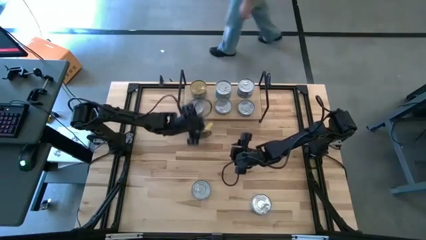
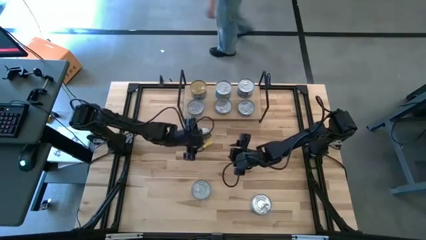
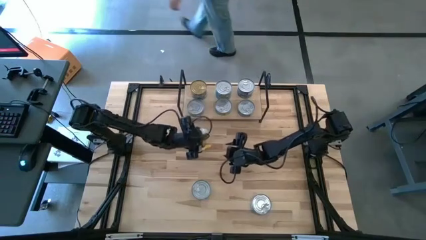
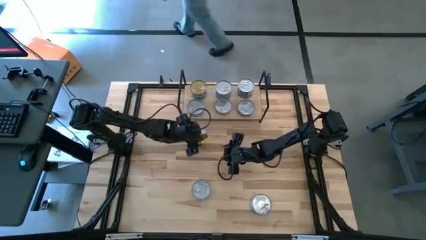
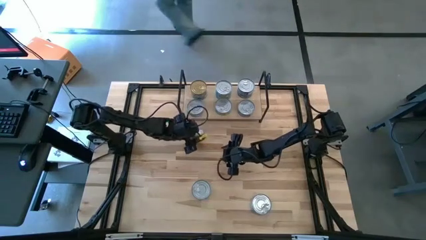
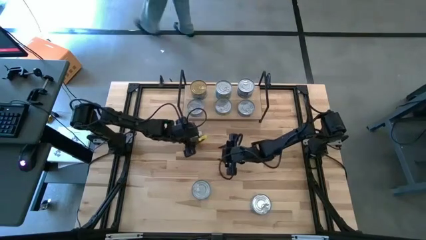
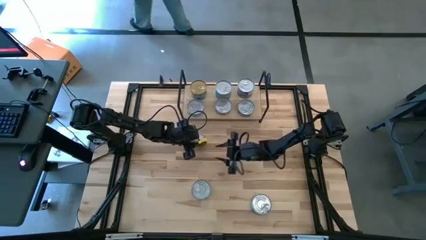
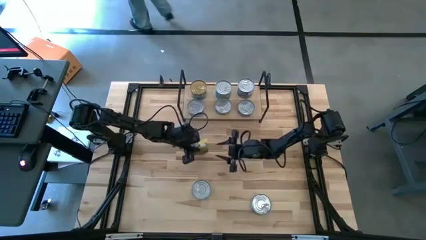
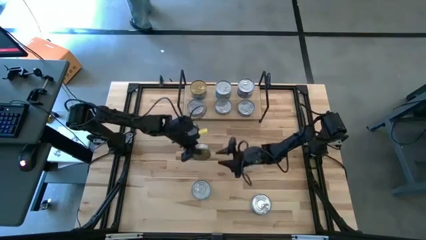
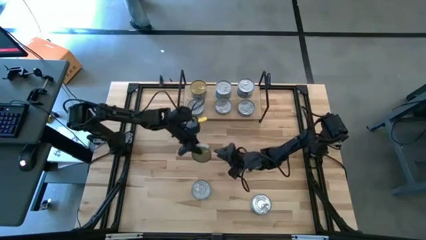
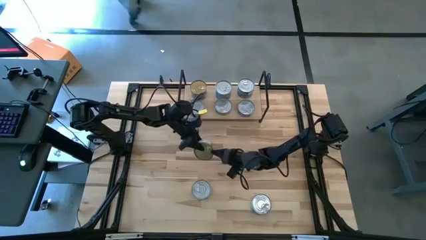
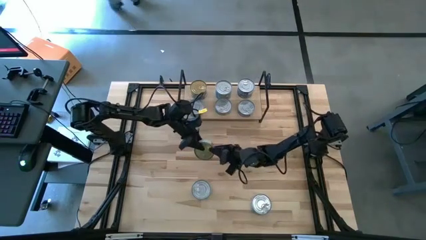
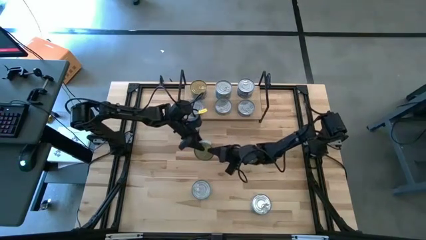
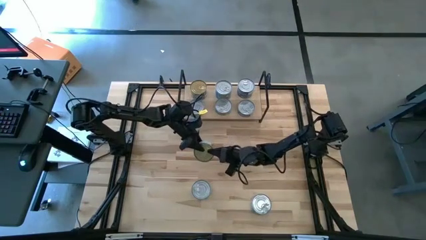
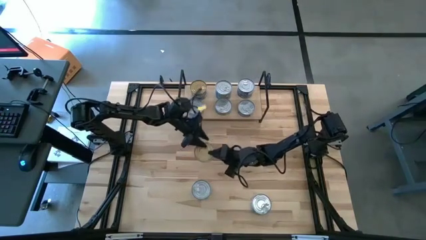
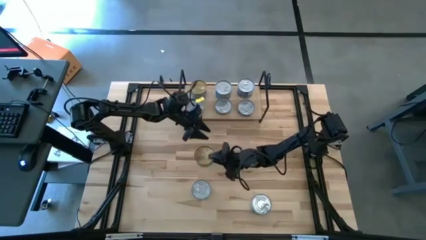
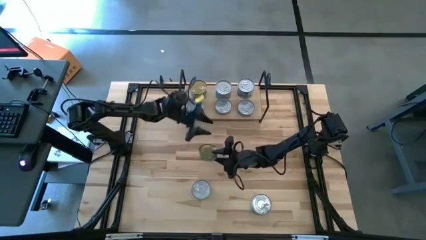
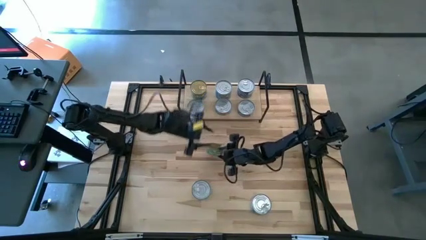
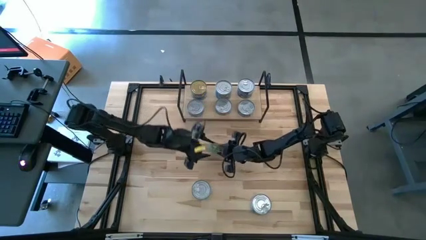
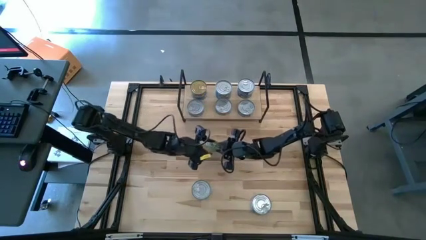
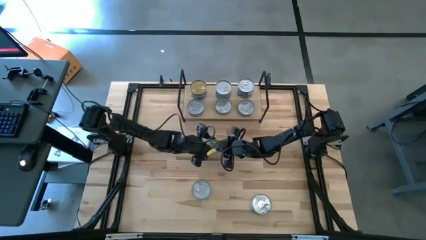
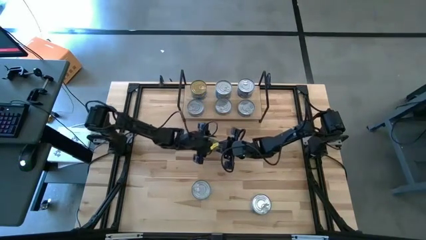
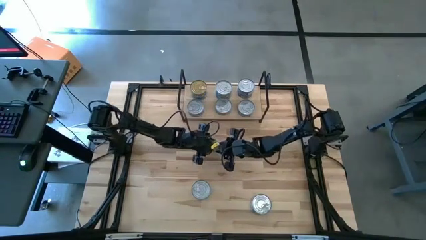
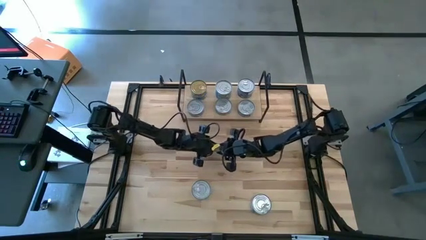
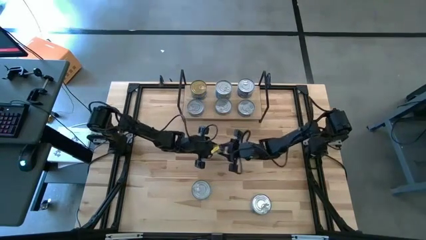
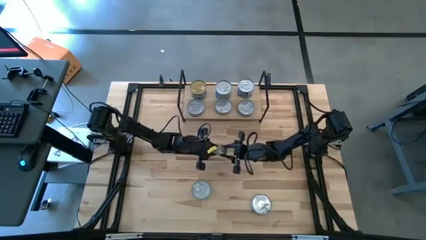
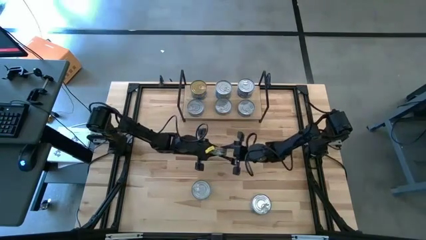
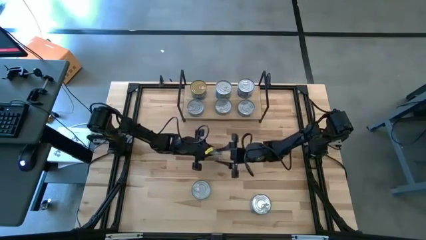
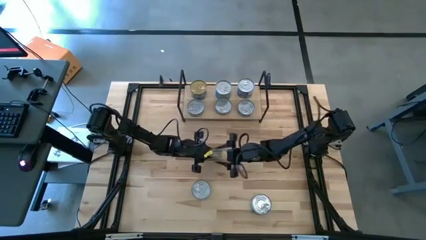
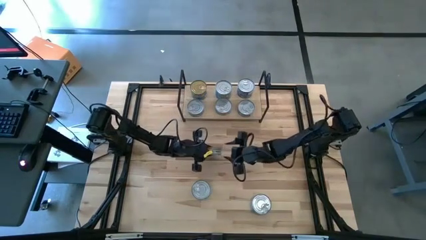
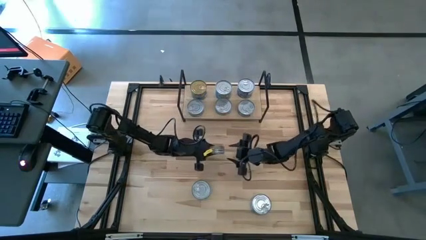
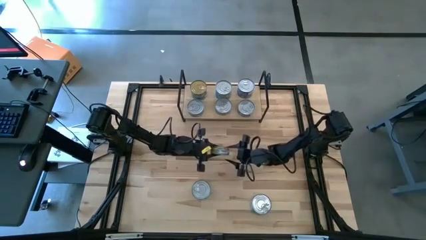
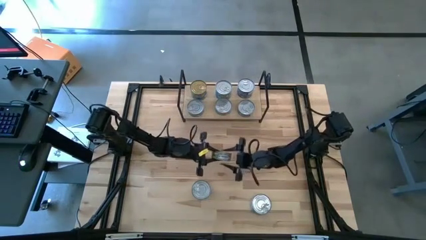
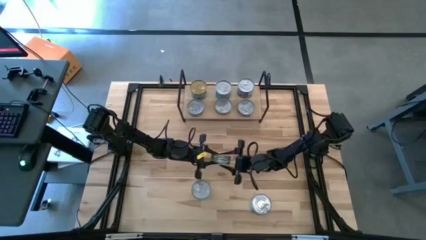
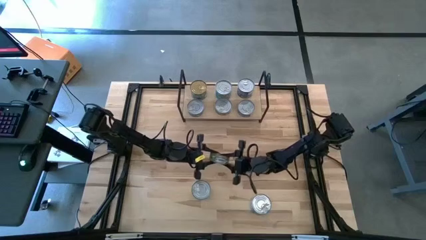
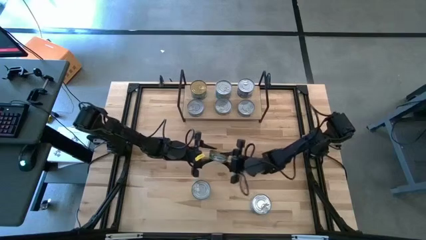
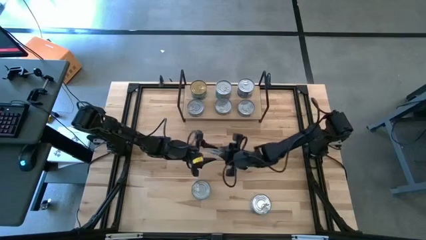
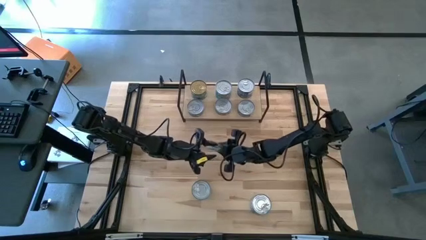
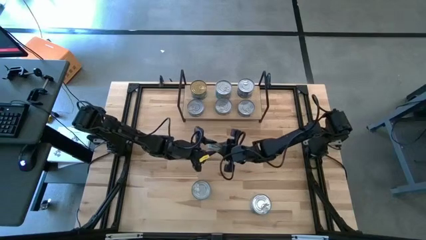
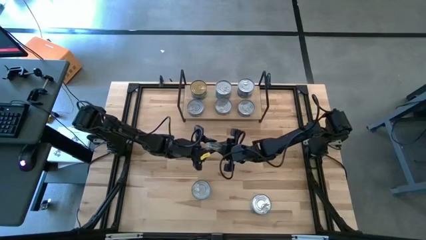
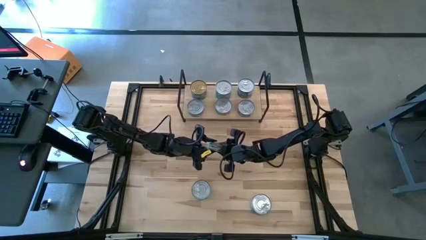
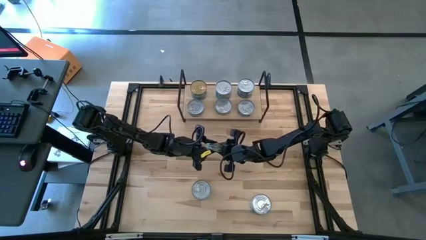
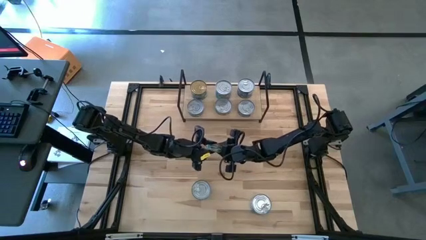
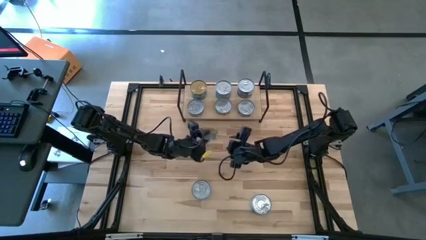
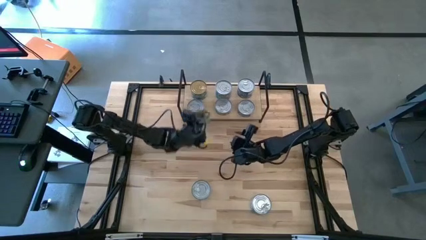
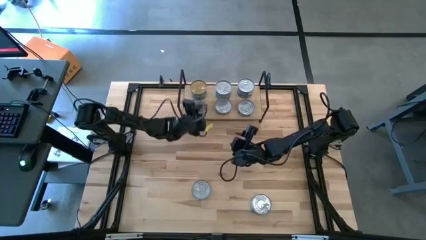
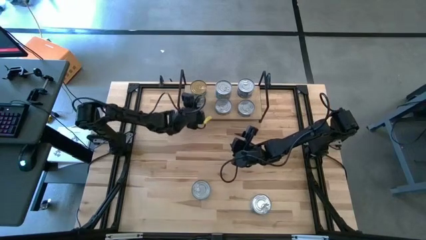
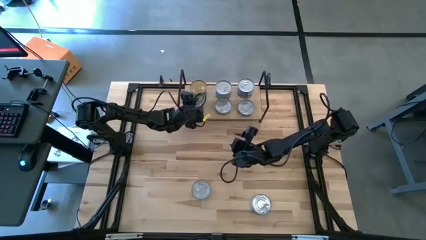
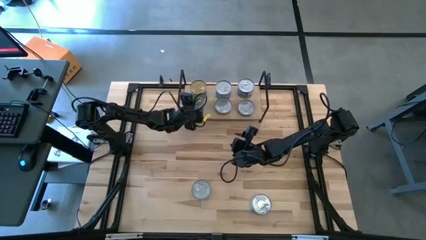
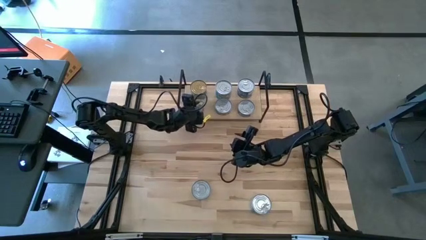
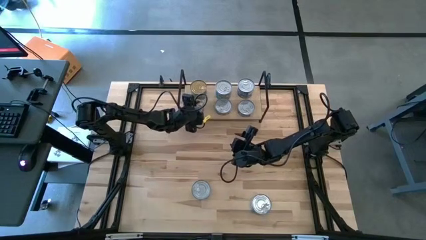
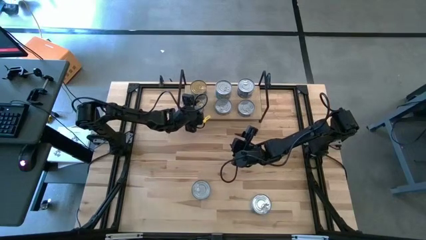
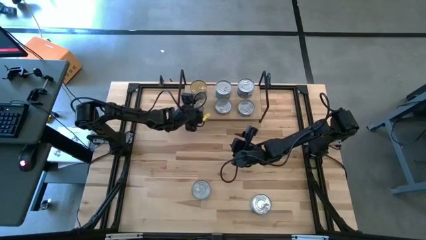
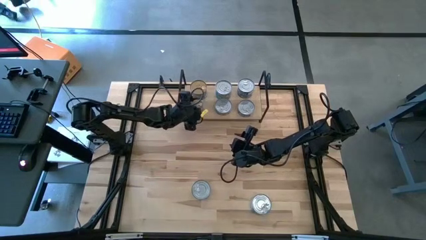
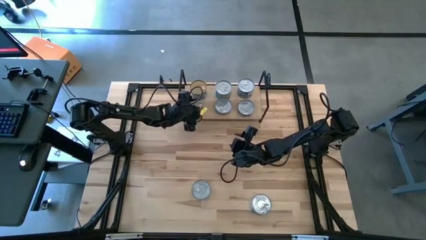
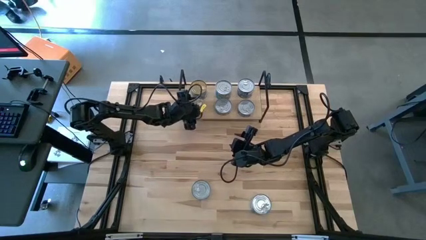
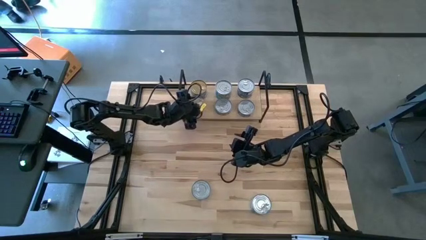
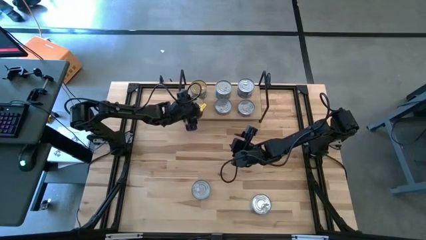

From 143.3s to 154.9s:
Task: Stack canned seafood by type on shelf
Stack the green tuna can on top of the green tuna can on the shelf

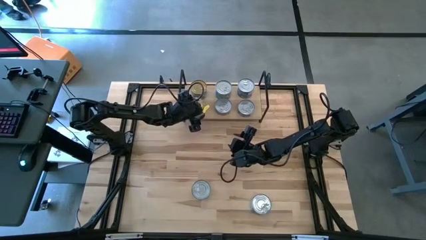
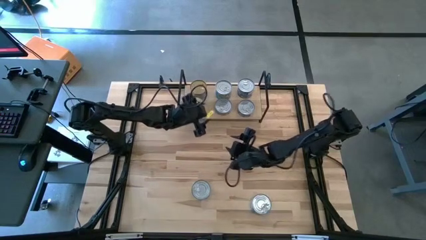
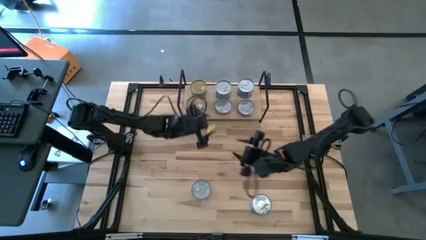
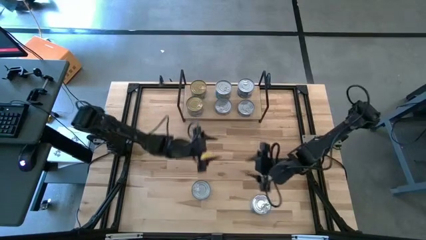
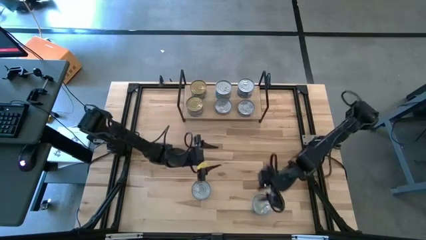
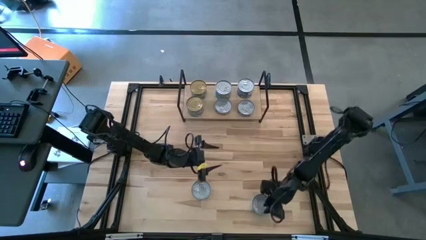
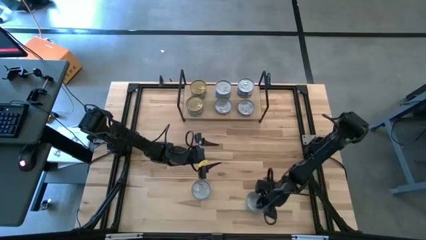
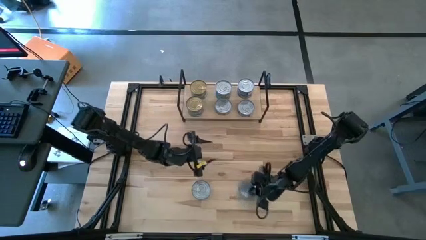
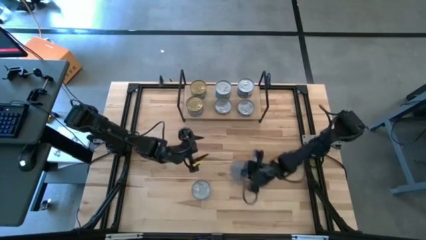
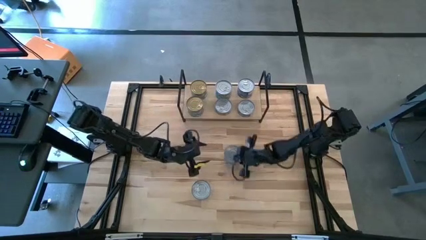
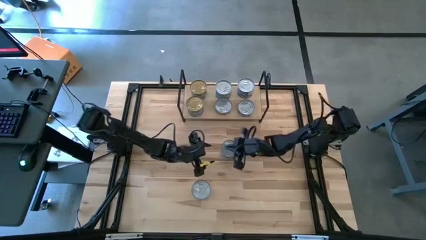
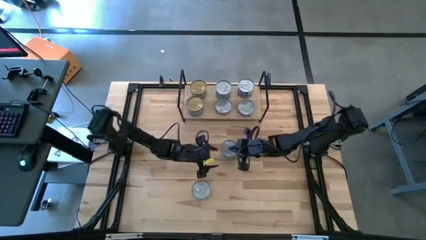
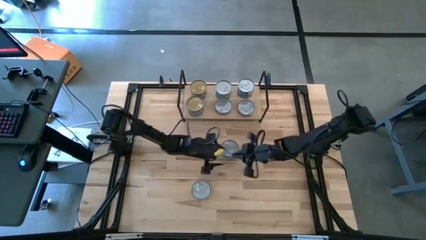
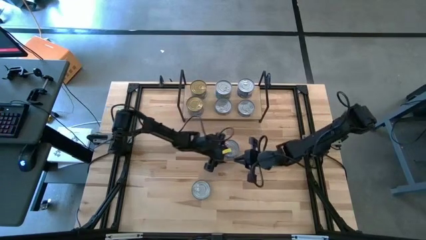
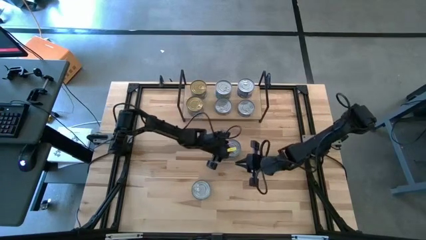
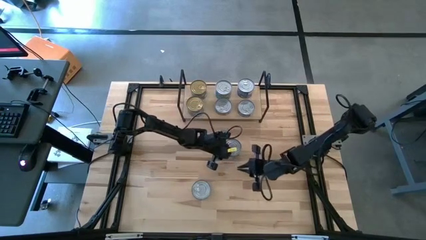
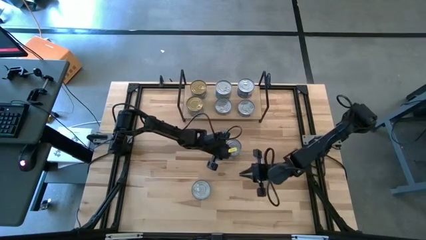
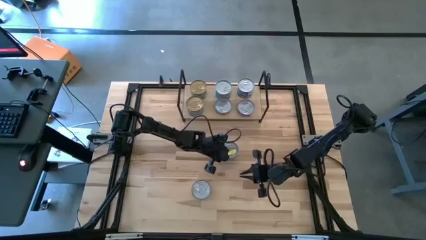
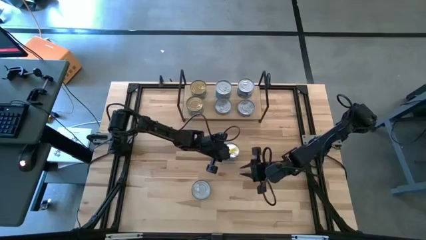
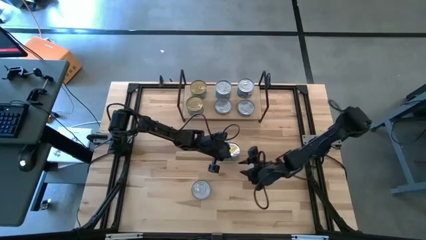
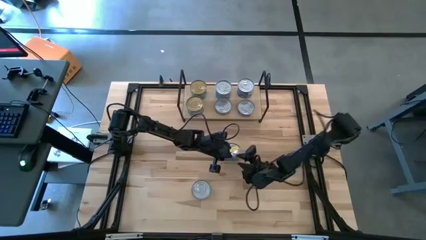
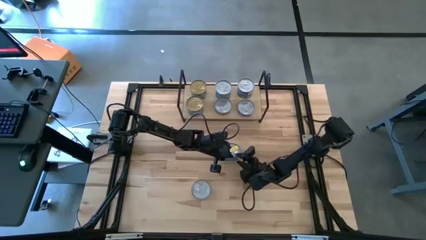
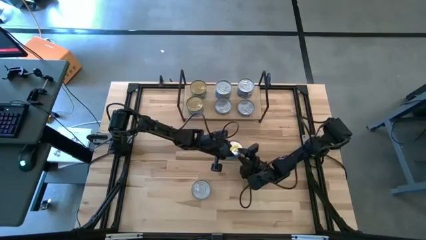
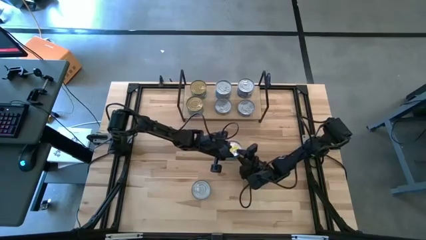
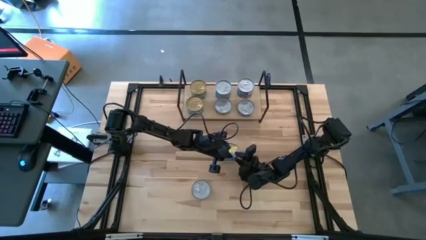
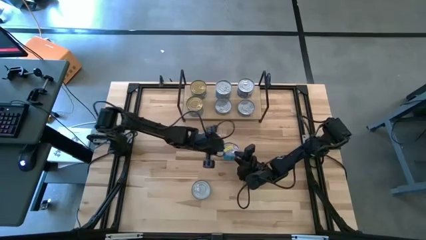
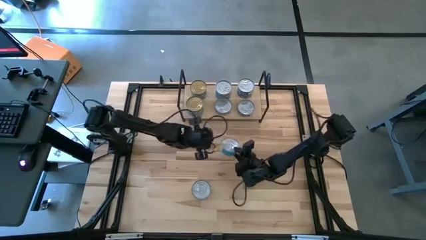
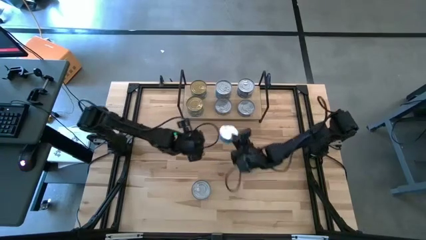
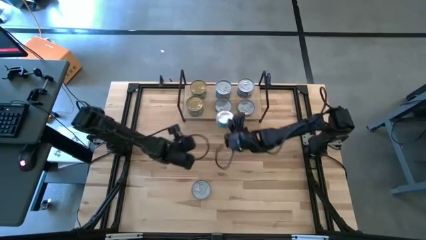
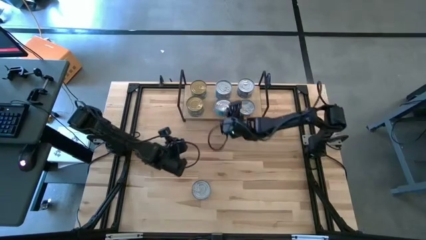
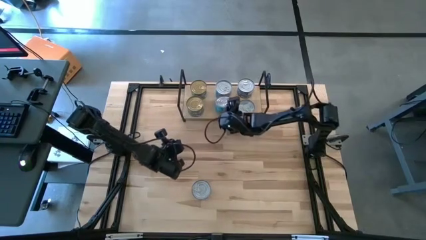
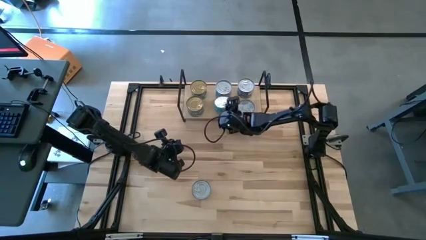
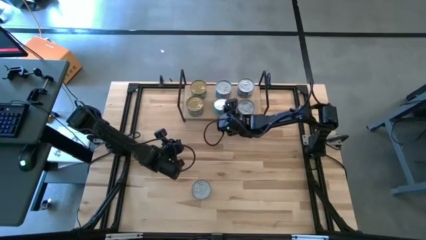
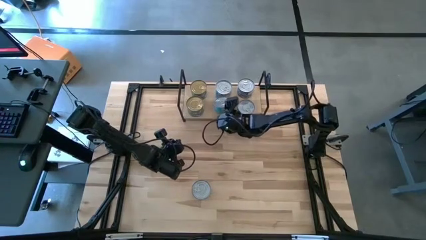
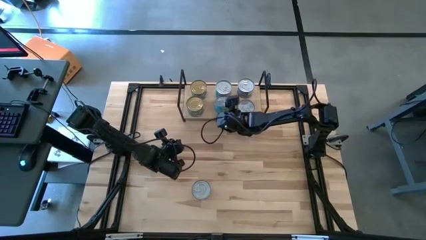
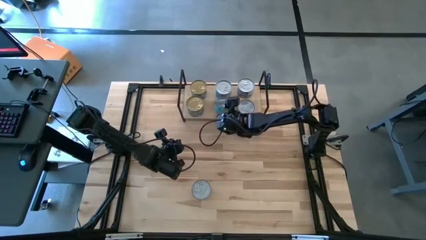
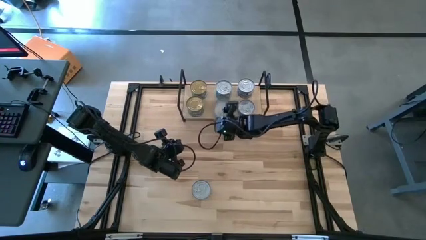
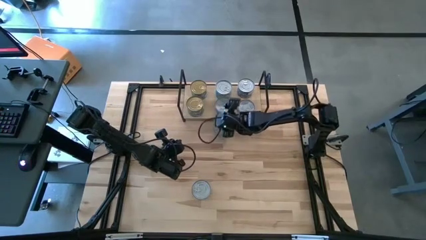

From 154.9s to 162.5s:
Stack the light blue tuna can on top of the light blue tuna can on the shelf
